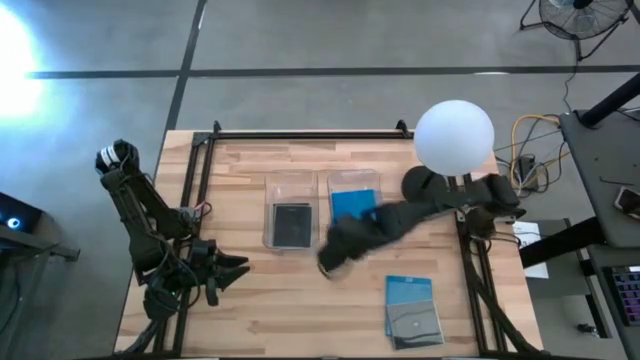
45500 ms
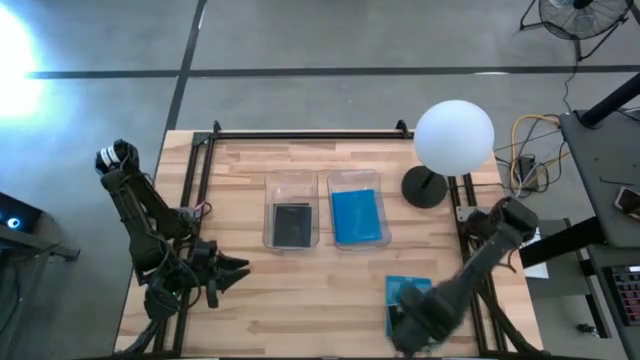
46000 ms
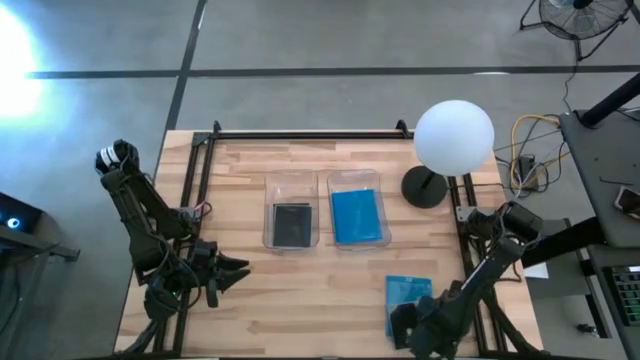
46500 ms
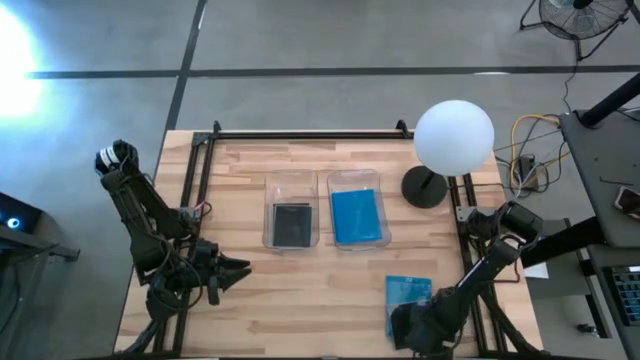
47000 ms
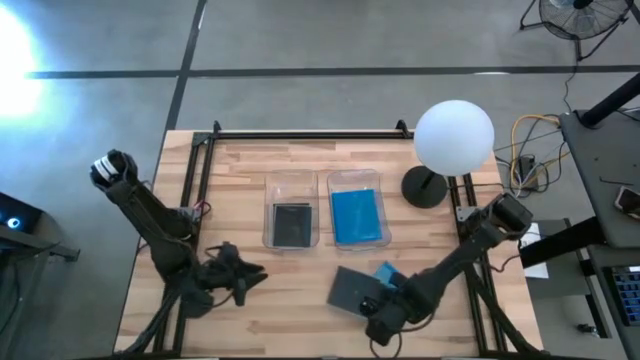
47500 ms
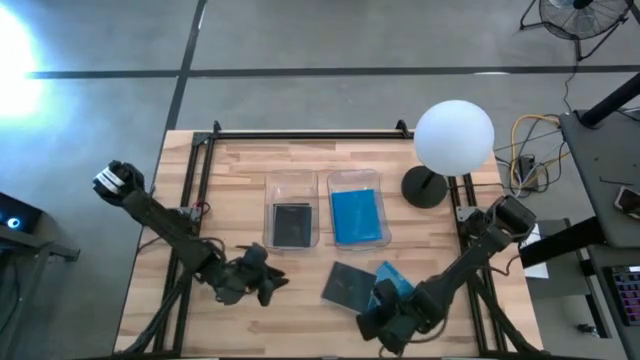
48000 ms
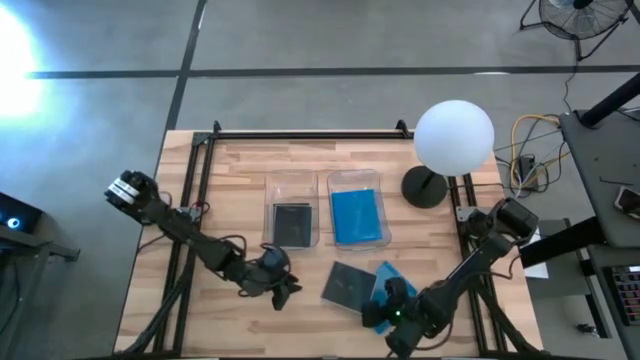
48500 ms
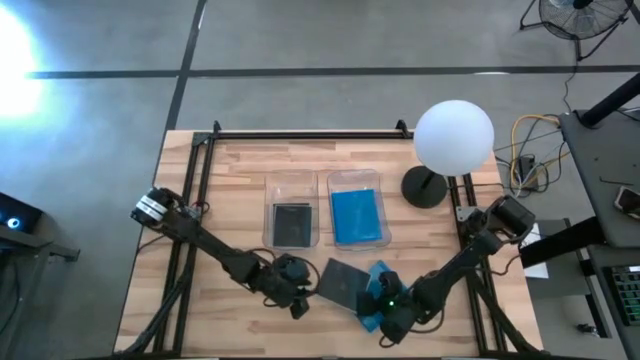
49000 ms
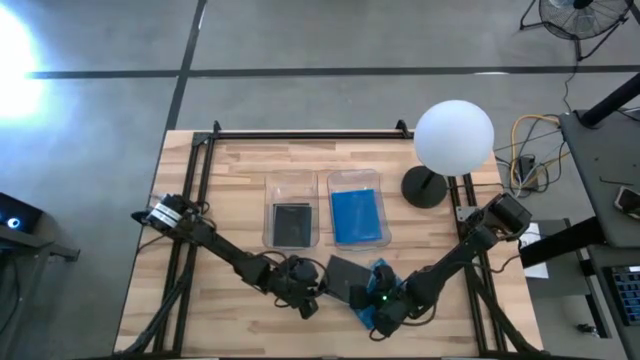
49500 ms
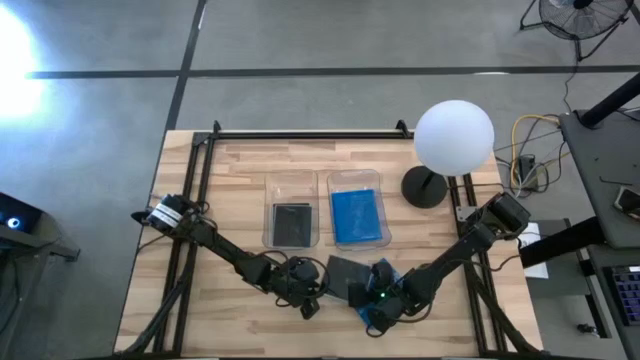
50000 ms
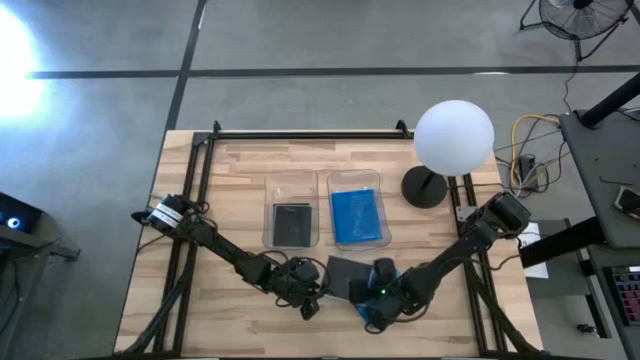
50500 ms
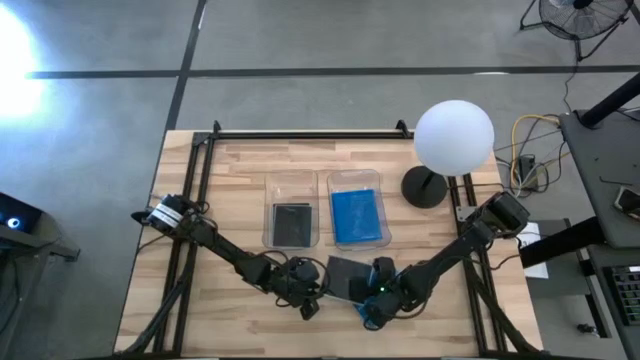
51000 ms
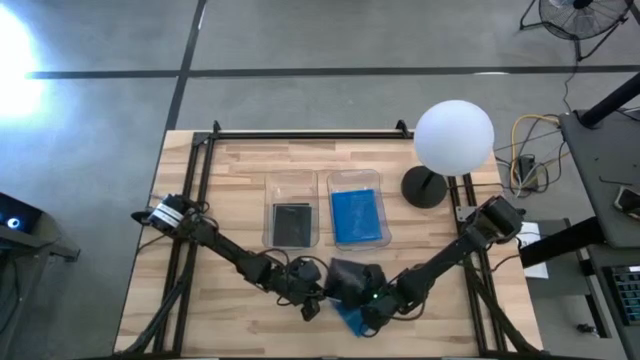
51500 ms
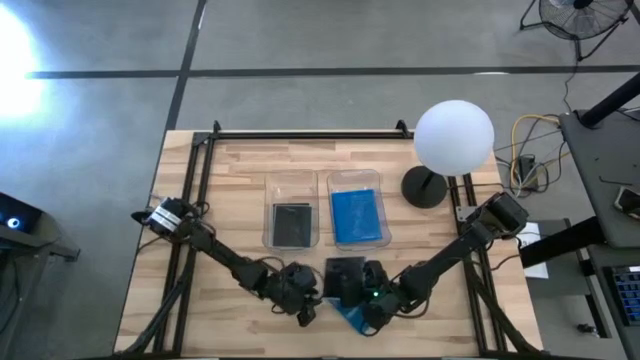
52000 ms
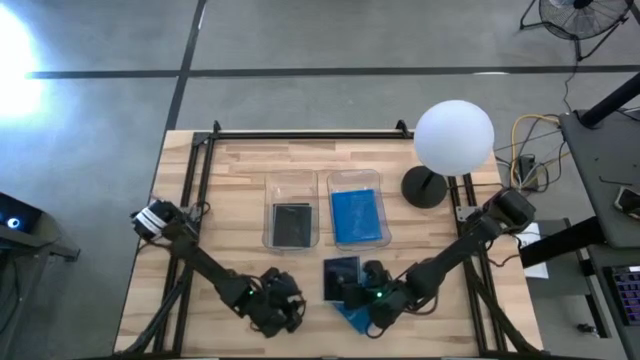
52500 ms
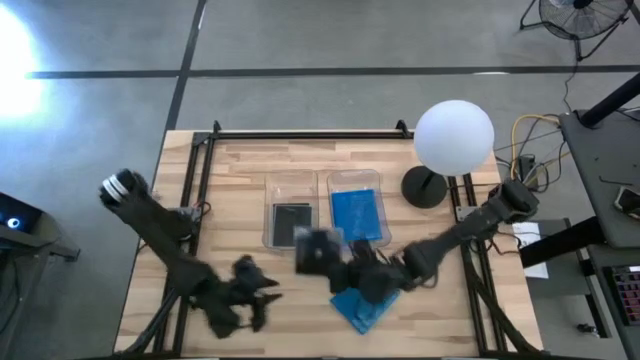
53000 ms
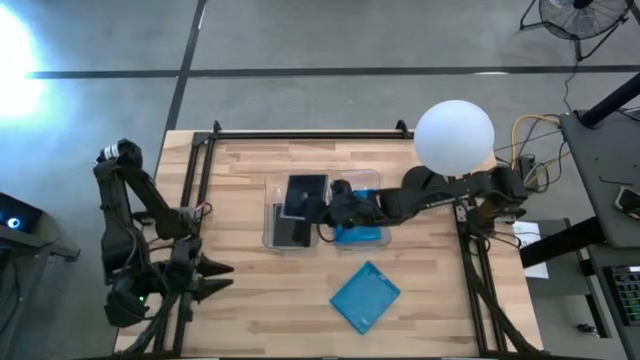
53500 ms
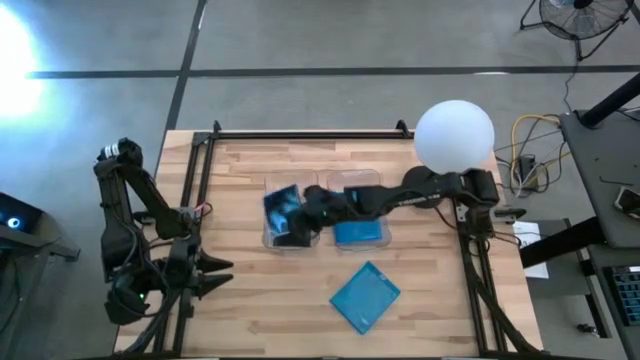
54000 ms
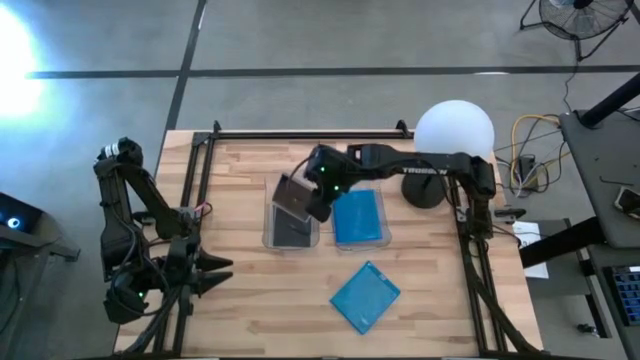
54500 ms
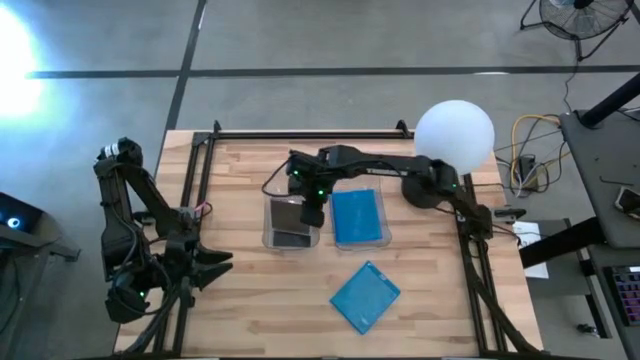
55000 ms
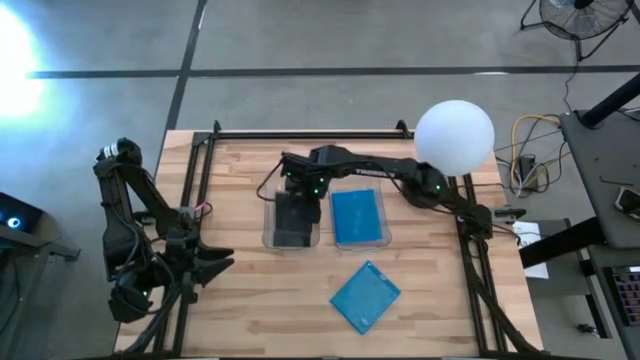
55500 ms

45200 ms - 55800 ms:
Task: Pick & place jewel cases by type
Put the black cd case into the left transparent bin

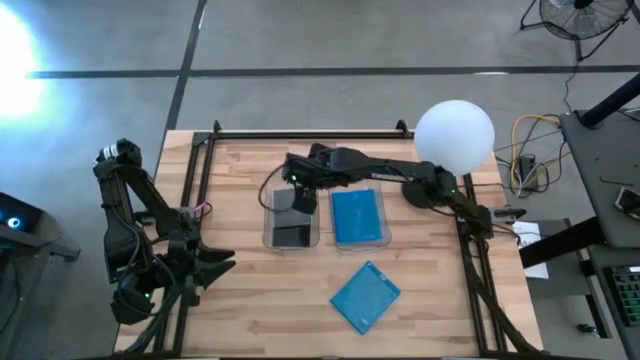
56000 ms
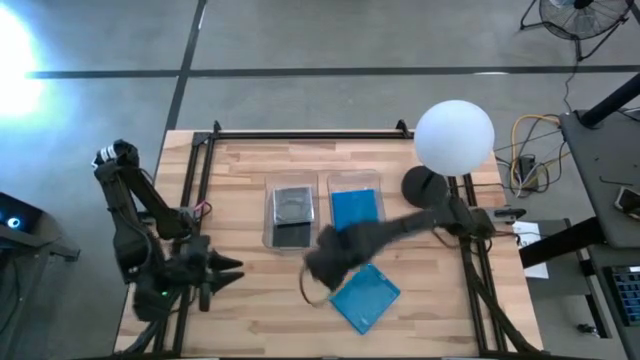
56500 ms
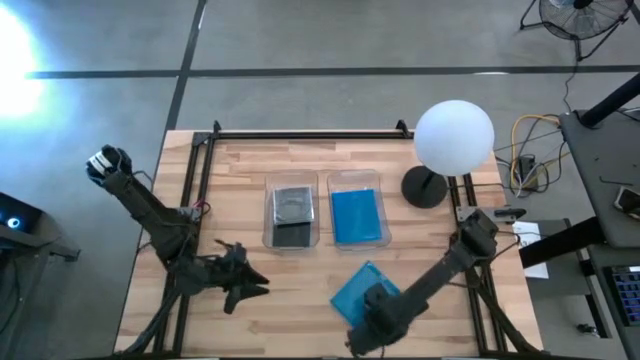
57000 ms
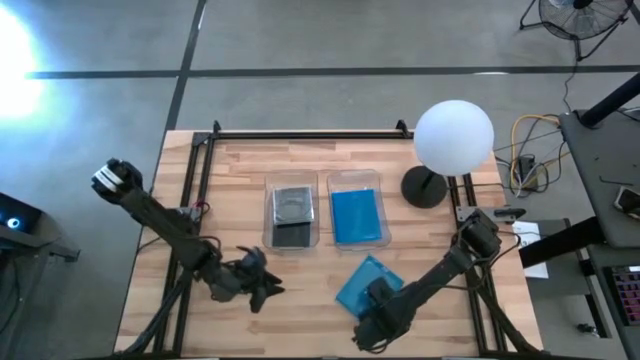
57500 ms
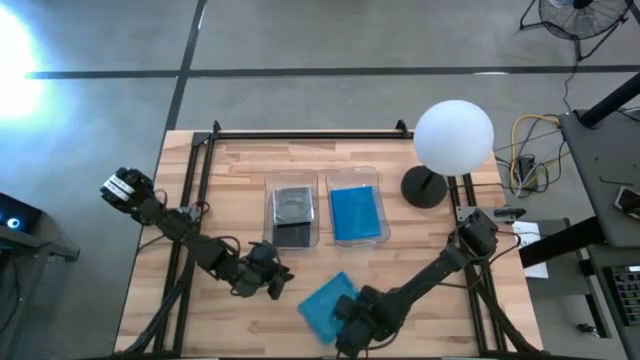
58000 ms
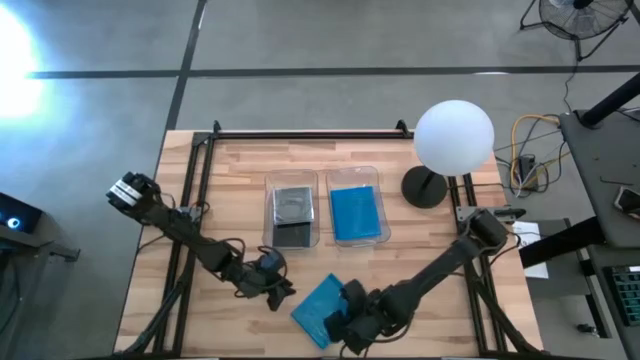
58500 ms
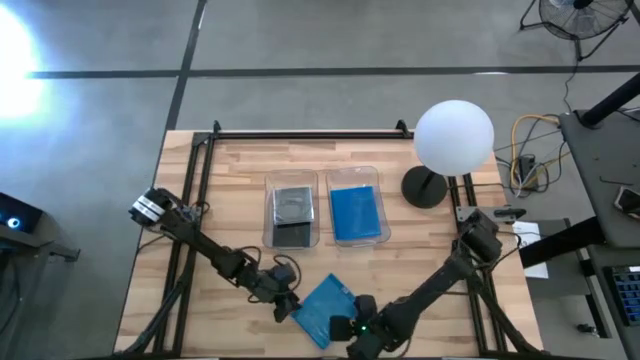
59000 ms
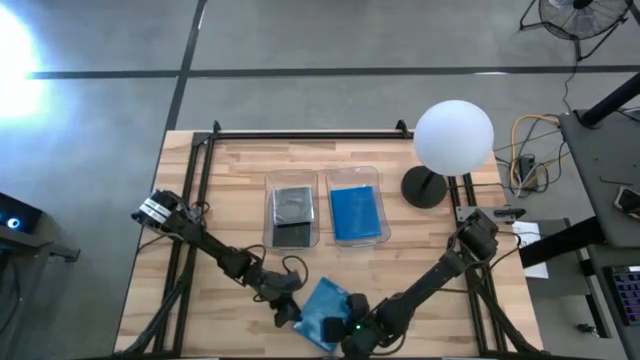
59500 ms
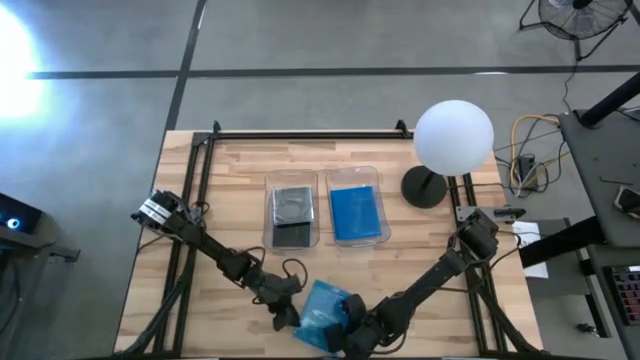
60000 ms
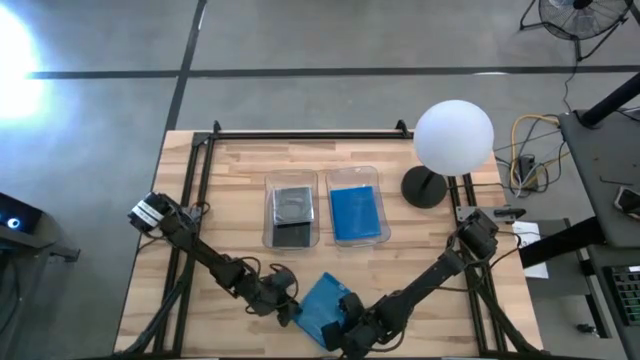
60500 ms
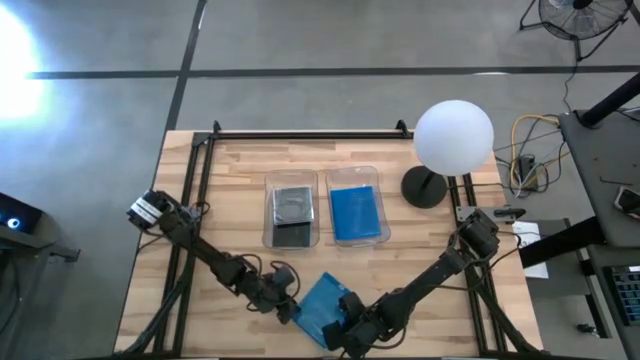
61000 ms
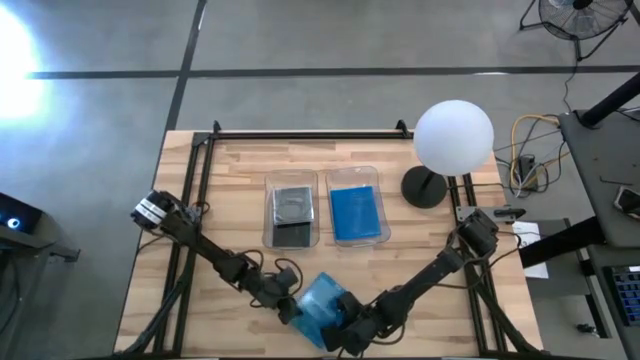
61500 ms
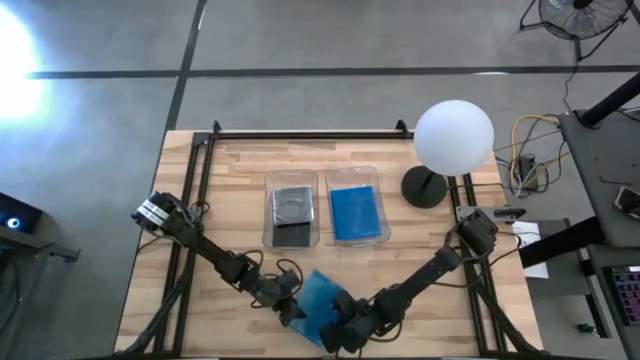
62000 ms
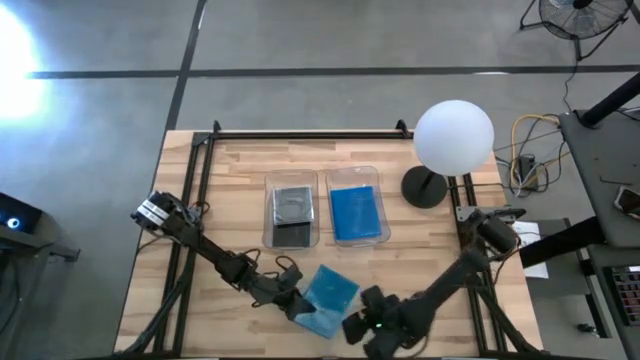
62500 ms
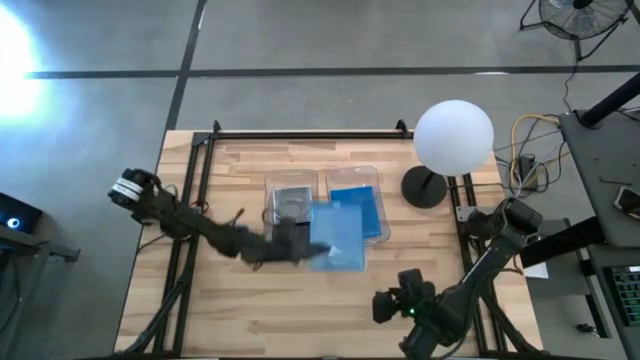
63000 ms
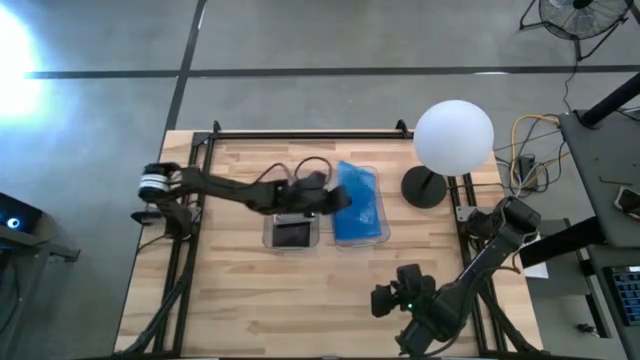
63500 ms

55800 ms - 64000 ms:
Put the blue cd case into the right transparent bin

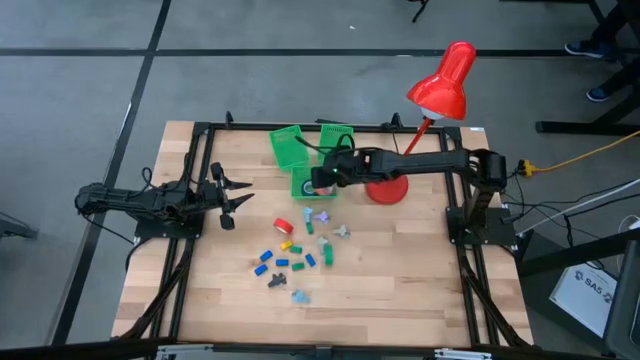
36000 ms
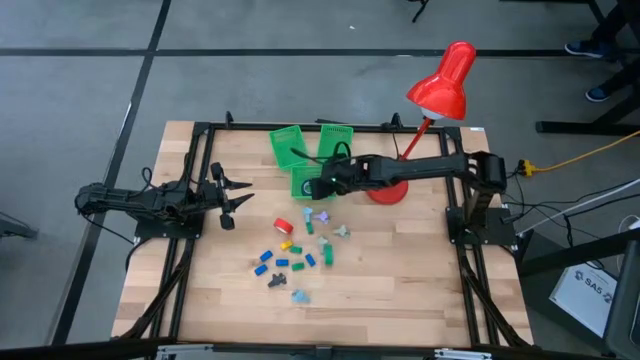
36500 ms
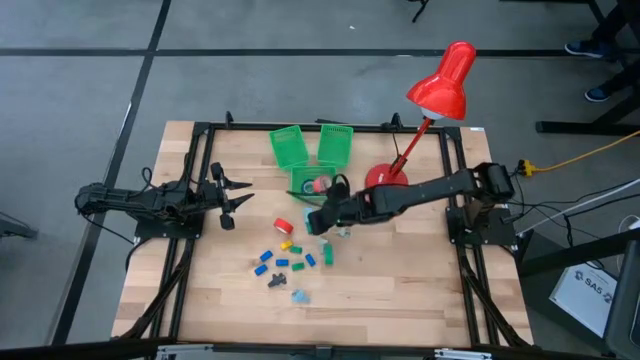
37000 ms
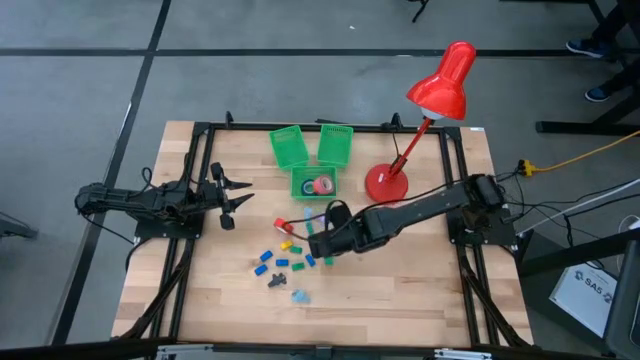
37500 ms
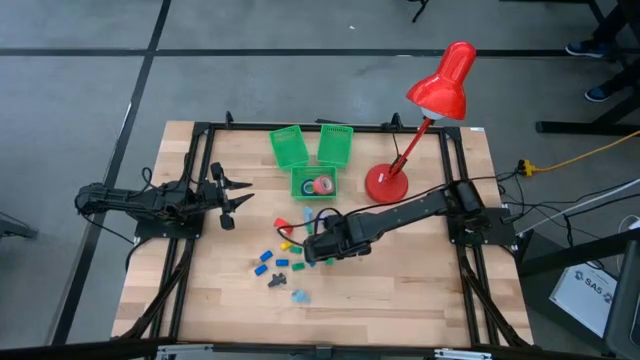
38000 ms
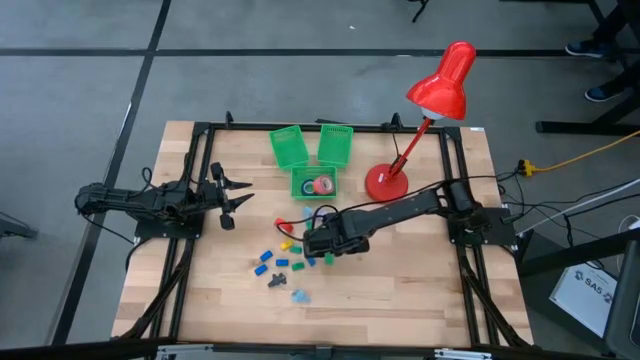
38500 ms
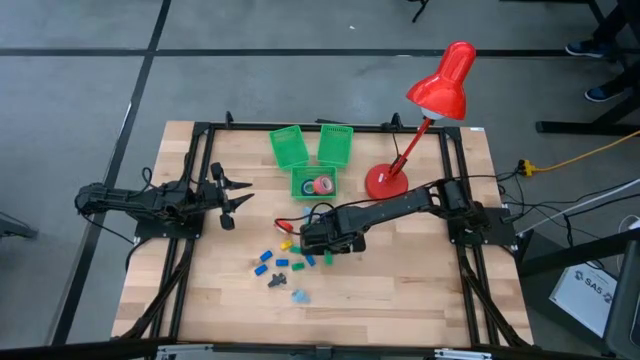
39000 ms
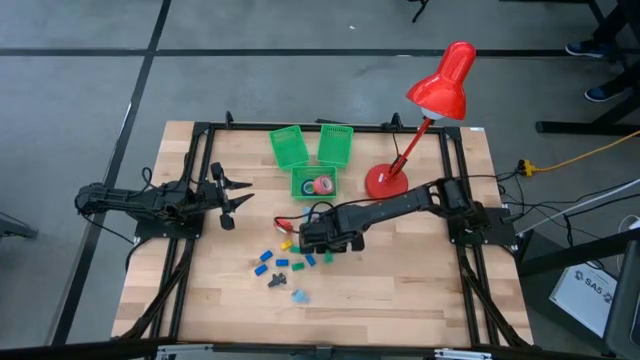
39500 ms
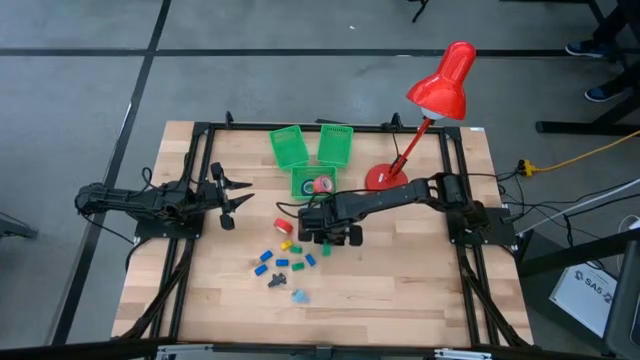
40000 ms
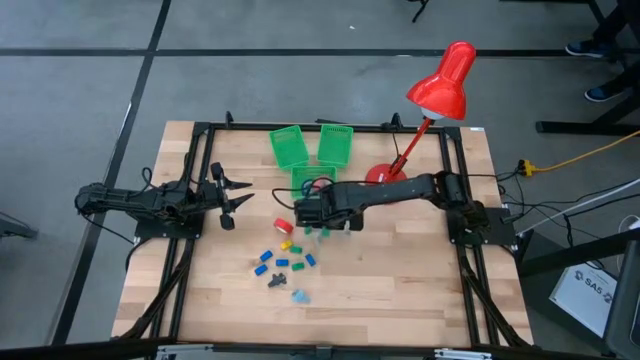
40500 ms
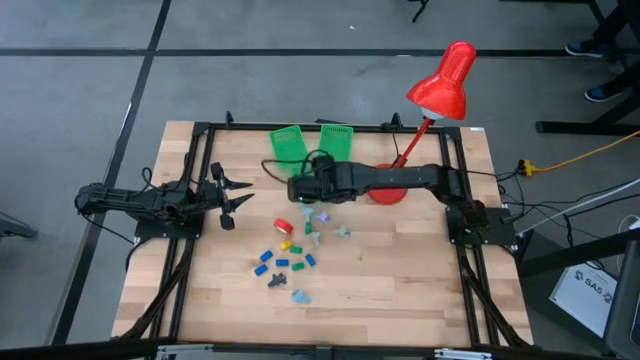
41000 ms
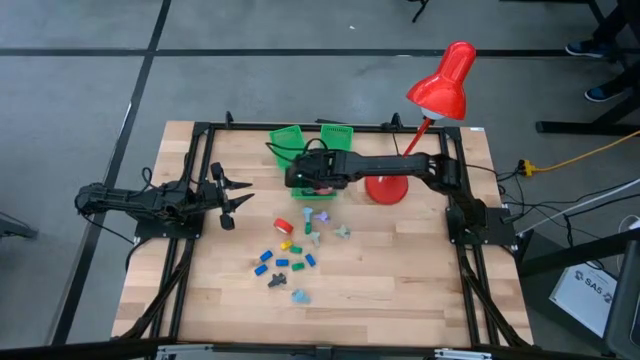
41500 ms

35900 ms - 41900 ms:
Task: Pick and place Stapler, Stapler remover, tape
Put the green tape into the middle green bin
